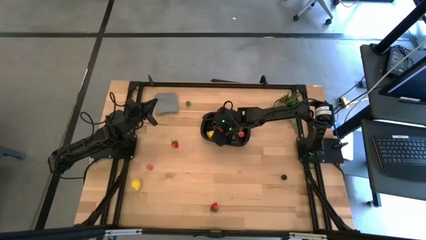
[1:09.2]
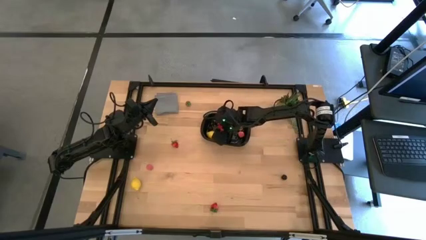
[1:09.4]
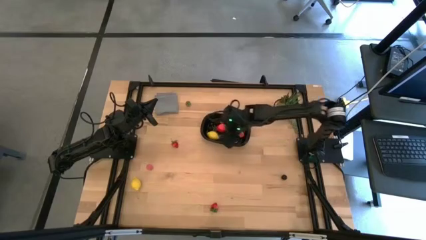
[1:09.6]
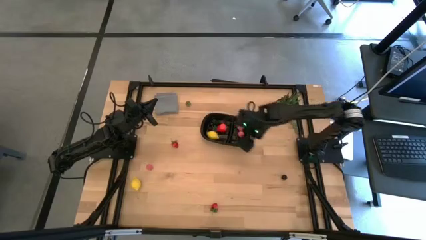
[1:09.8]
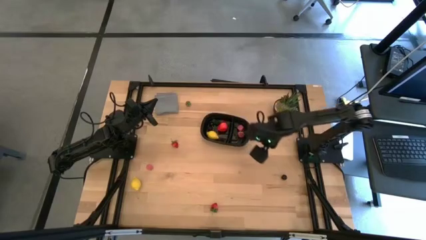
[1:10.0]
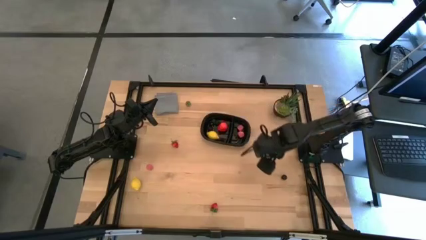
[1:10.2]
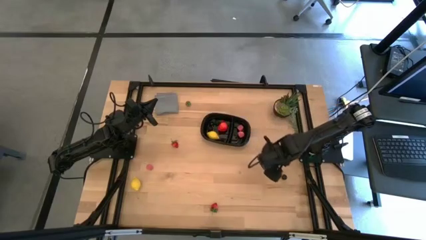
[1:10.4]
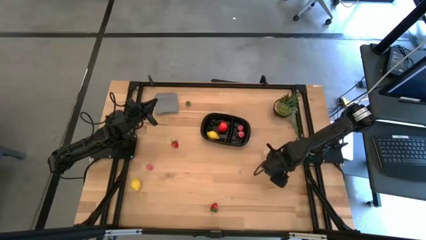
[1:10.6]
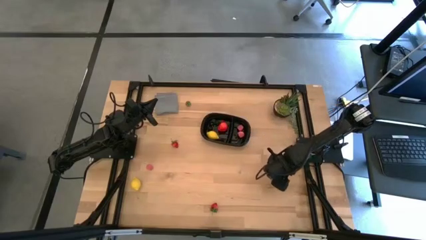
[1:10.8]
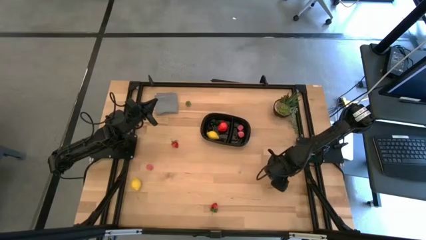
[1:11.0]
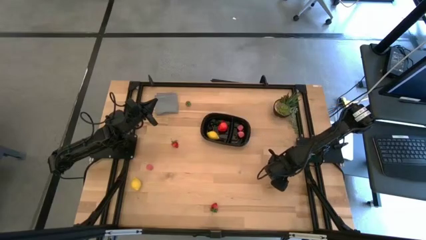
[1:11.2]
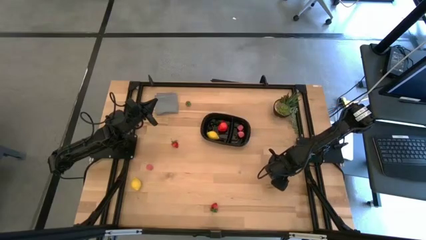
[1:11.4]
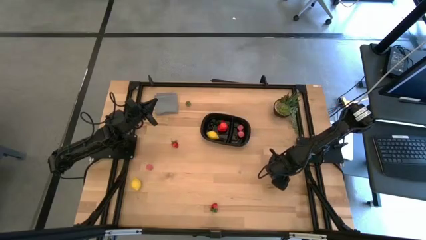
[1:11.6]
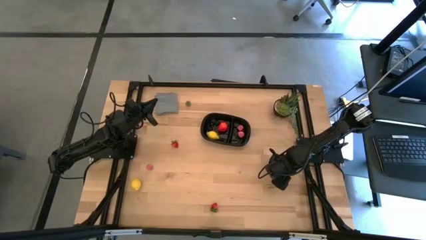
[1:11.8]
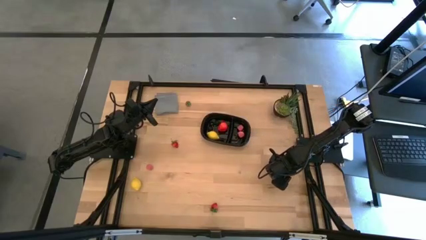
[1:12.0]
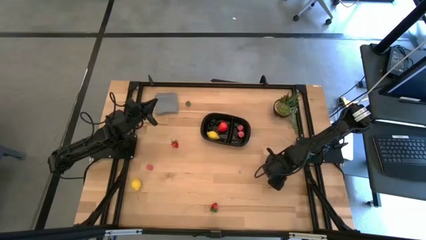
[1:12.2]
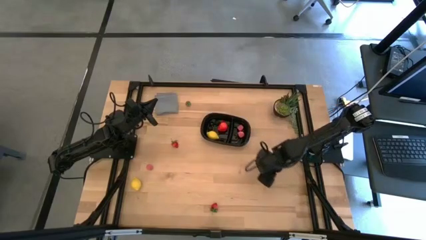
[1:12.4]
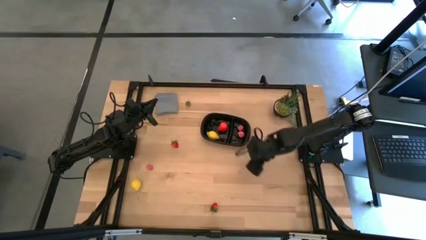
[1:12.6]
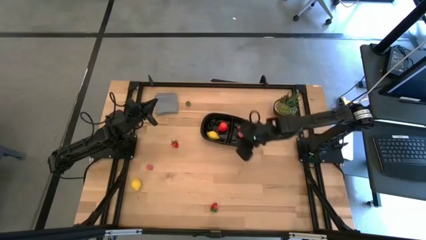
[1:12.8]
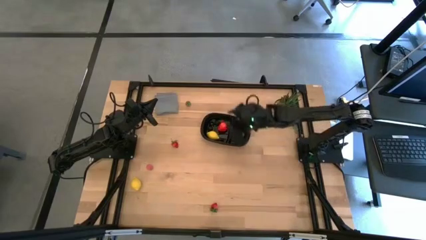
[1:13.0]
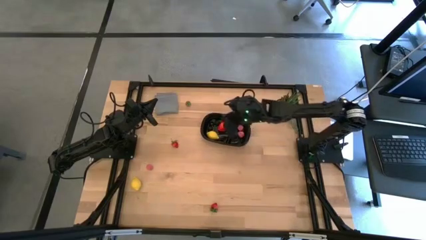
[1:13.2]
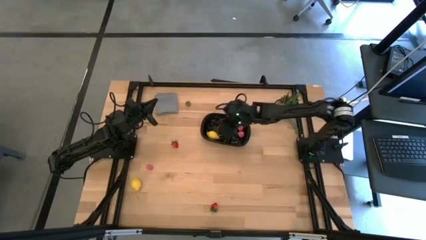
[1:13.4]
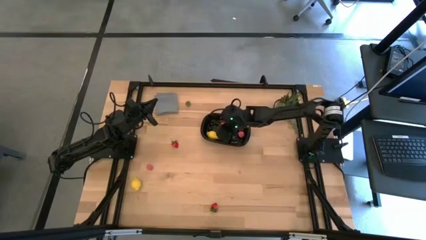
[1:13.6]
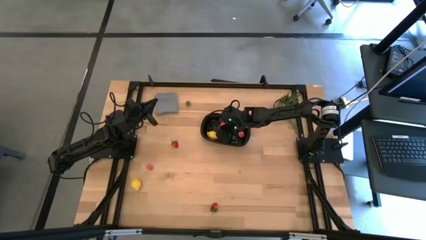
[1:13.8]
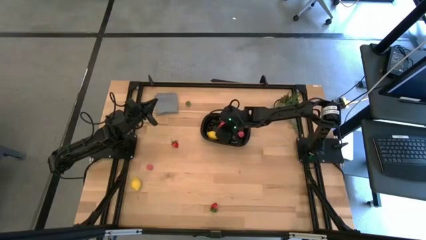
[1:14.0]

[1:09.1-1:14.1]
Task: Pick and placing Produce into tupperware
Put the black cherry into the black container

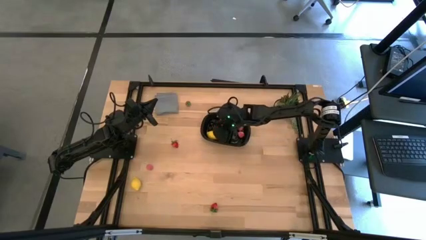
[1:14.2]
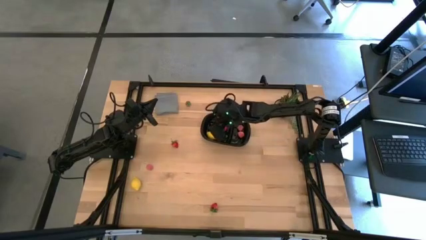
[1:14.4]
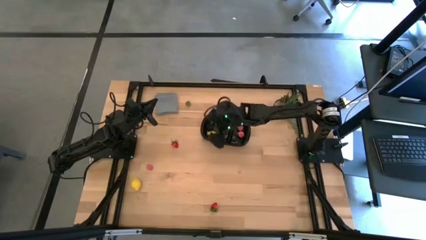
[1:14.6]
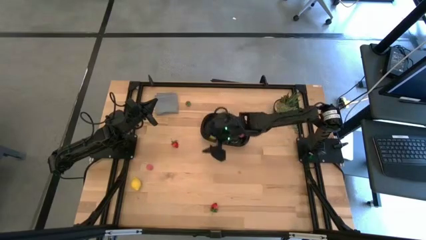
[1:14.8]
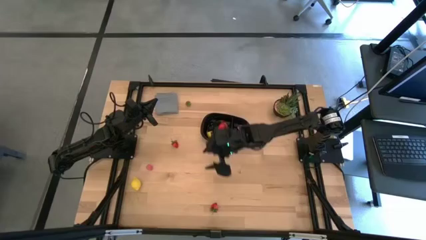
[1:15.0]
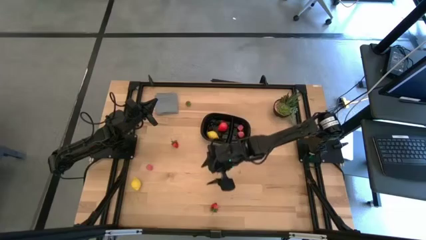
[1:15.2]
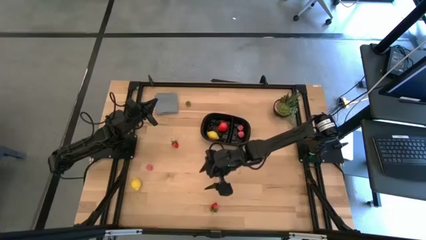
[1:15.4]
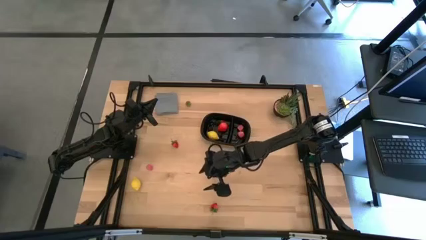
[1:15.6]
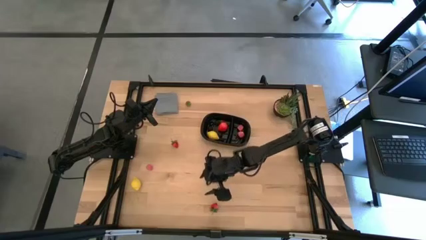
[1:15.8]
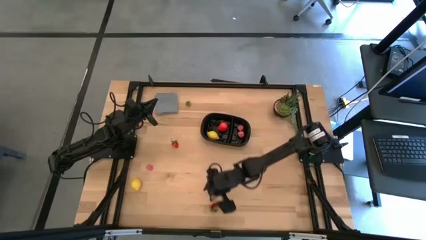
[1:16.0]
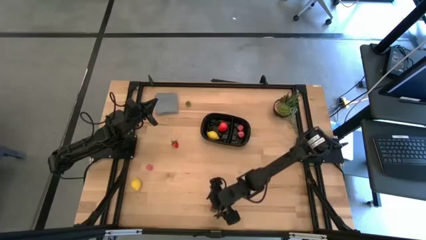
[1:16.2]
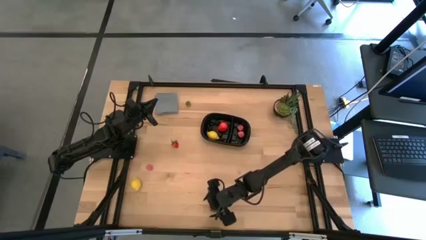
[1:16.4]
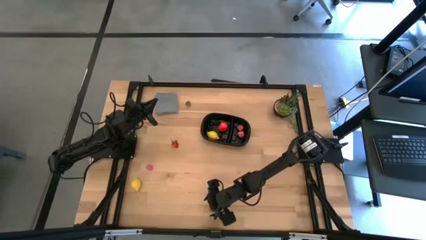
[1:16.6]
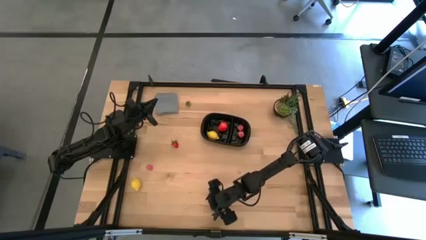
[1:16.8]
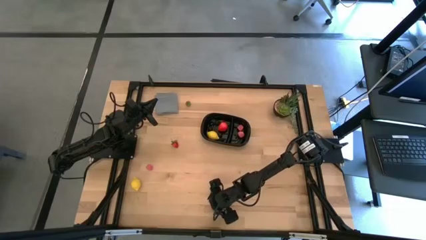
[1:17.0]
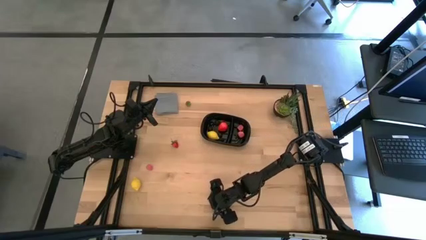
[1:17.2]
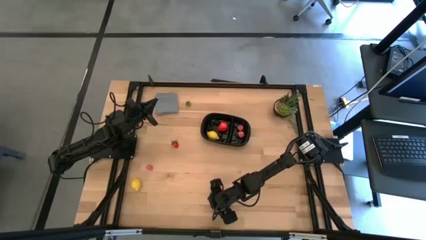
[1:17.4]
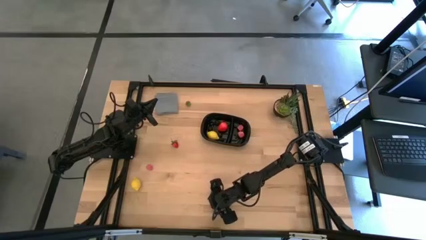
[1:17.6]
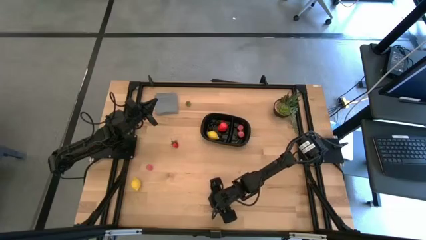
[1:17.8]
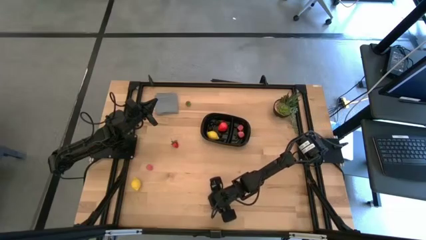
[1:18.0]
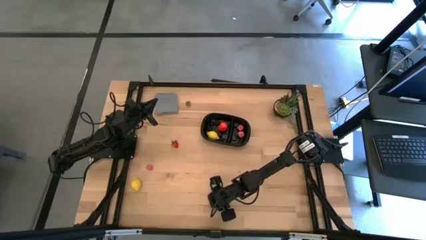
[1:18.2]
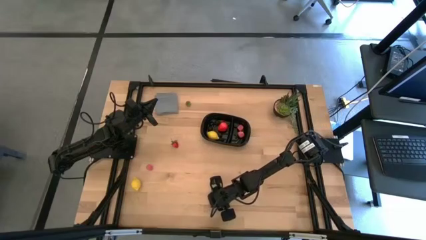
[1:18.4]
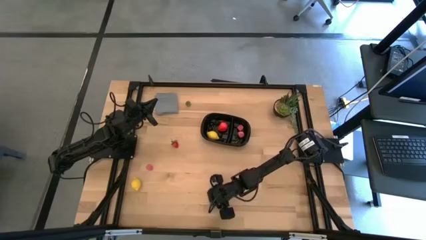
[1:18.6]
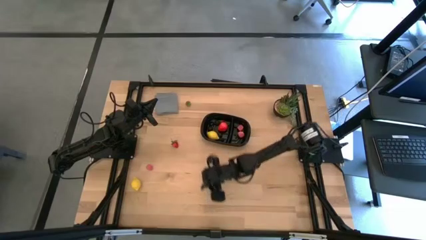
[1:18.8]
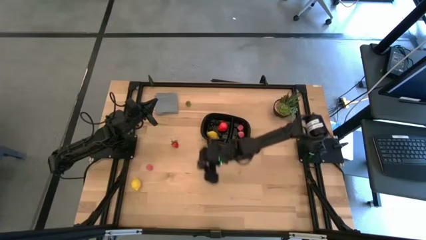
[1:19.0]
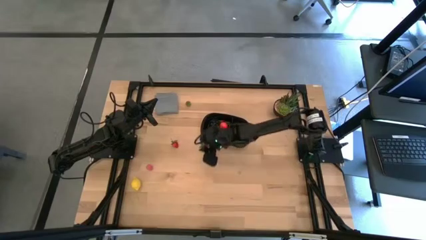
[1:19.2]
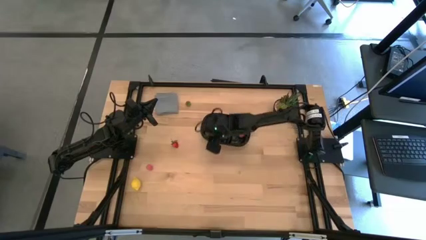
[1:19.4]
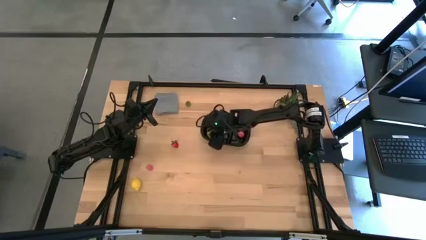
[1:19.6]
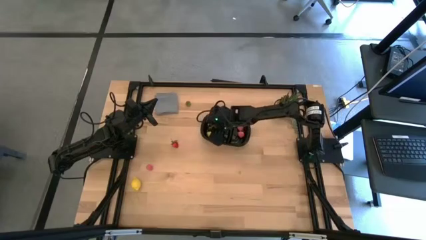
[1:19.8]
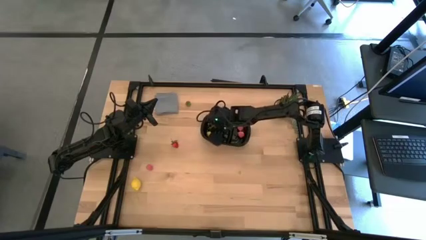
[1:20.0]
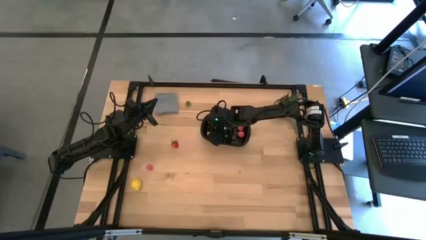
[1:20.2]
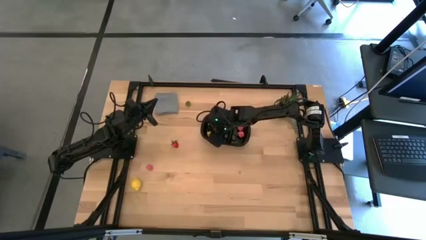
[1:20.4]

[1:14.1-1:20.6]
Put the red strawberry into the black container

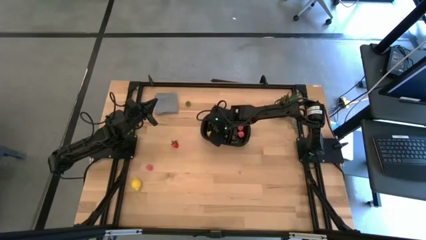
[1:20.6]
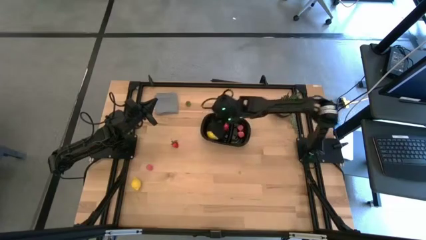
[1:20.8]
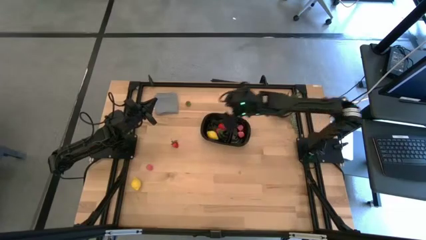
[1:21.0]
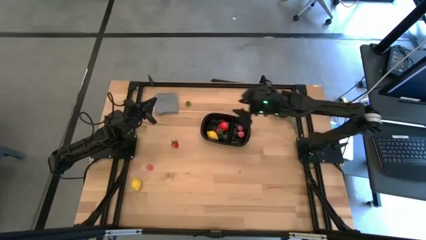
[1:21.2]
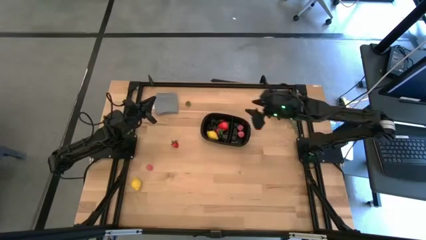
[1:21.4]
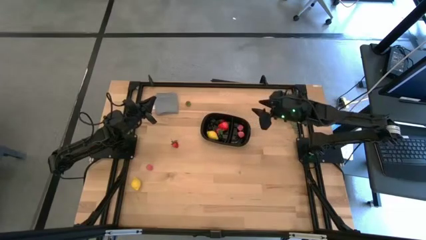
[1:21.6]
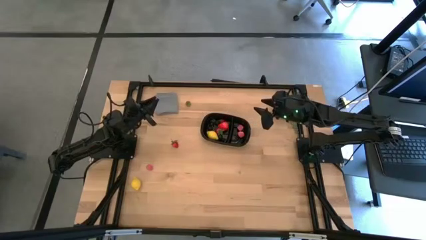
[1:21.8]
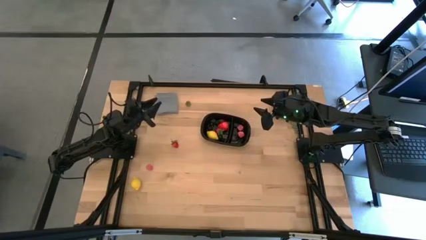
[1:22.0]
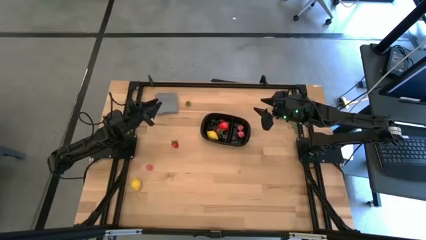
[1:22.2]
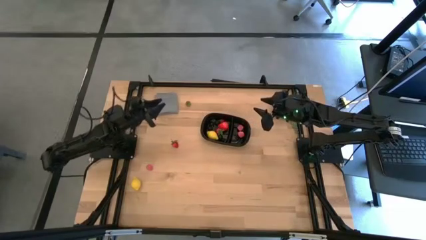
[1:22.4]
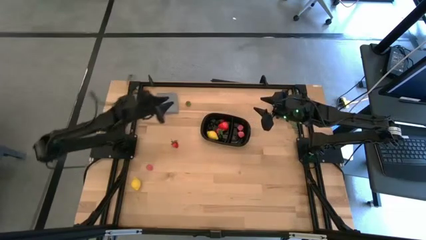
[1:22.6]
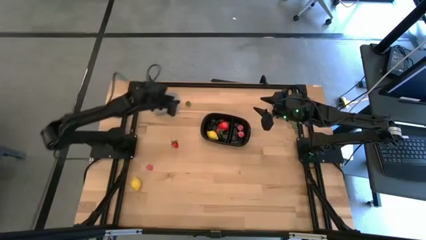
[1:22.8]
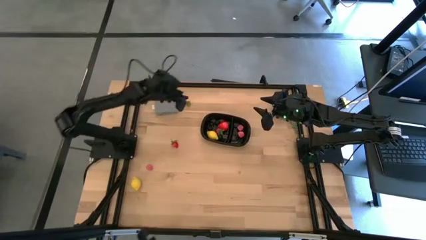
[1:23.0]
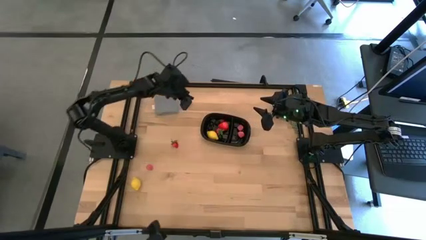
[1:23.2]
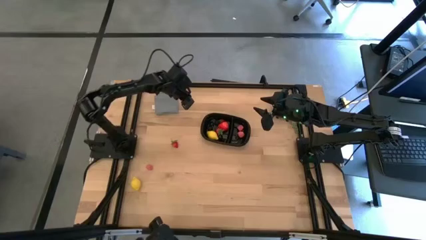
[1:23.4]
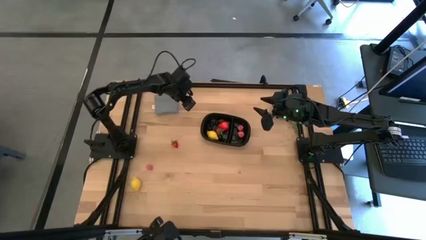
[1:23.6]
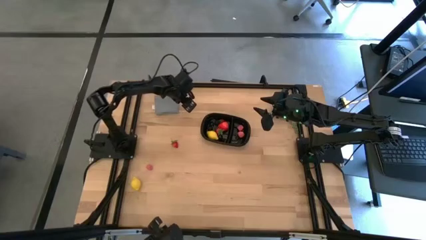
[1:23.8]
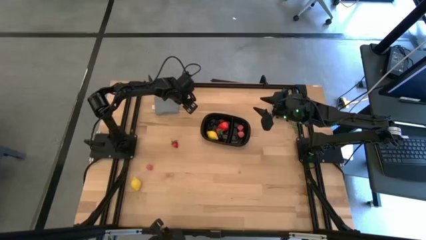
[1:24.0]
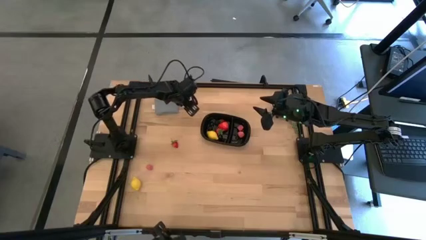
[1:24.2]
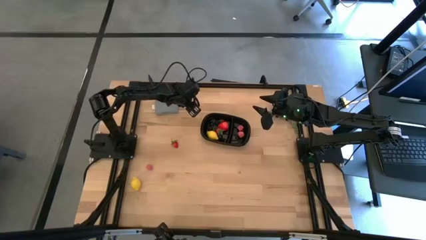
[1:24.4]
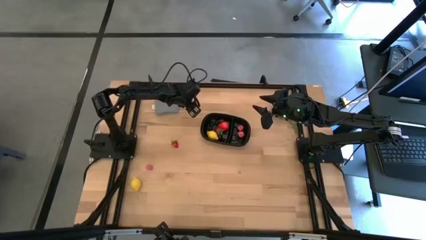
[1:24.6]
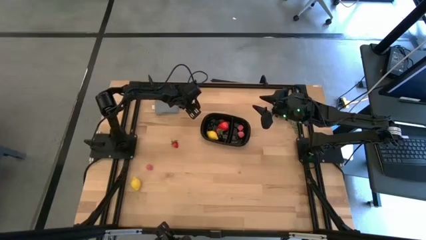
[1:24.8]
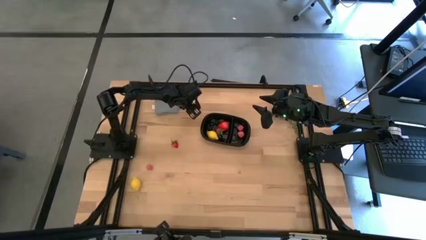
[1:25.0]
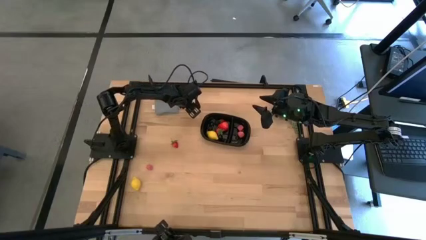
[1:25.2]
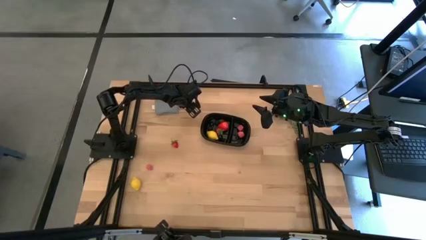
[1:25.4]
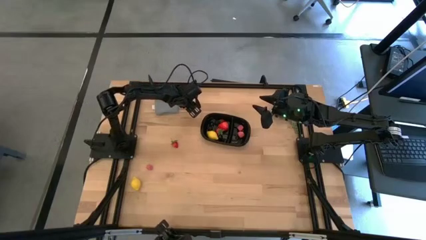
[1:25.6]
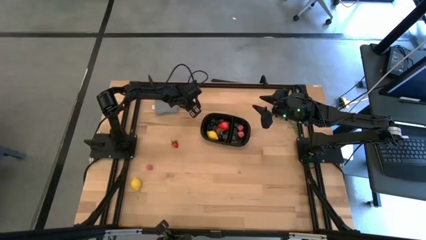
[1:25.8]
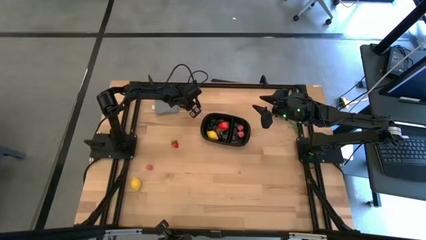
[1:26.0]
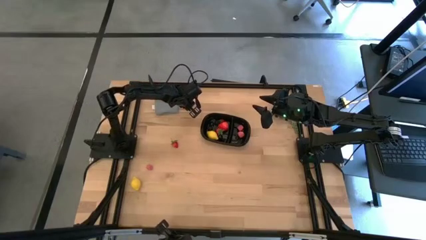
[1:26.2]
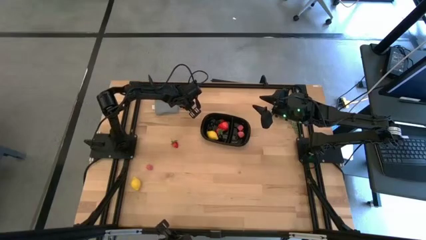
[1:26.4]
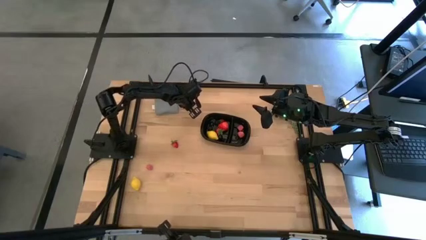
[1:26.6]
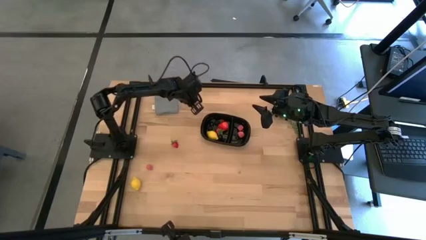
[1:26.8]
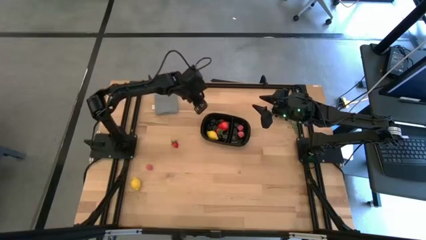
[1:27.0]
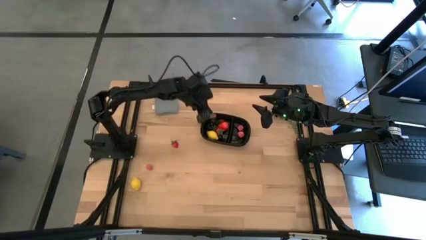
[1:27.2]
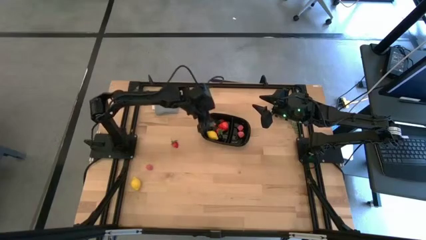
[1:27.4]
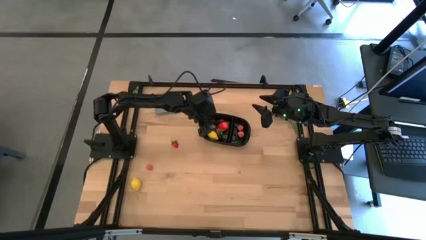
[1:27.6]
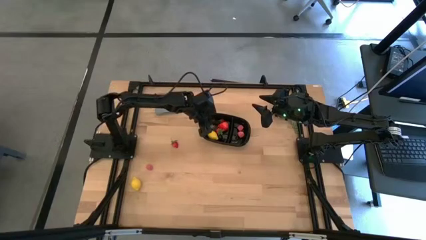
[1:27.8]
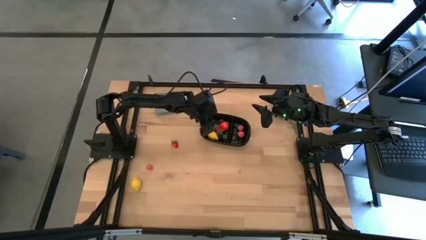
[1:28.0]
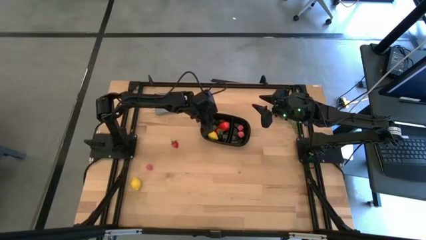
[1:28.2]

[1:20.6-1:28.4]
Put the red strawberry into the black container
